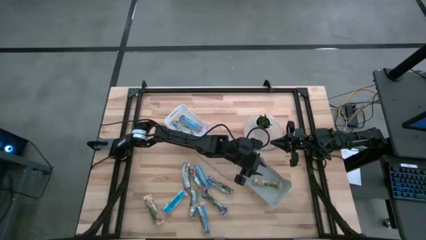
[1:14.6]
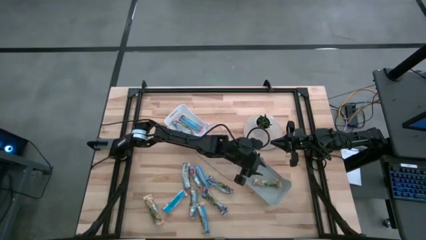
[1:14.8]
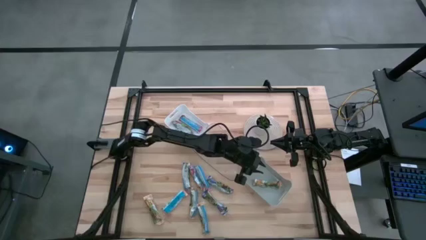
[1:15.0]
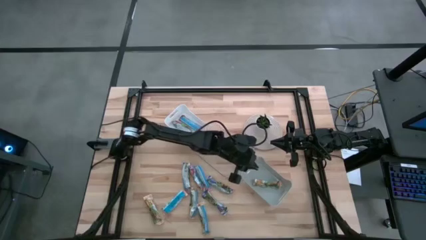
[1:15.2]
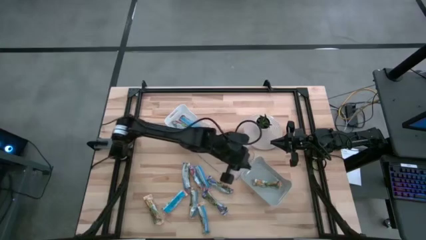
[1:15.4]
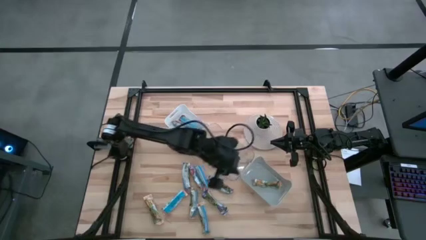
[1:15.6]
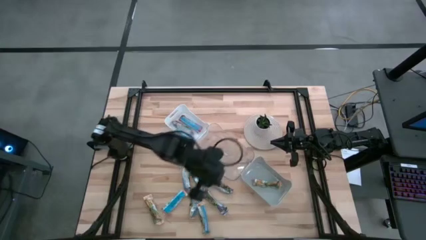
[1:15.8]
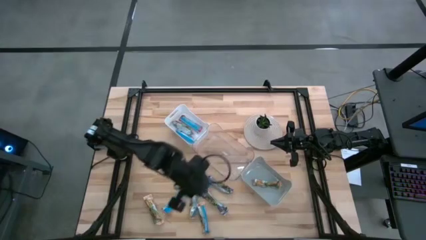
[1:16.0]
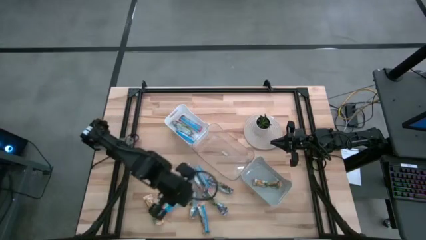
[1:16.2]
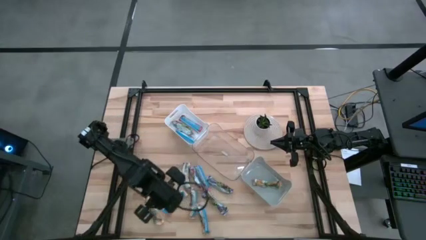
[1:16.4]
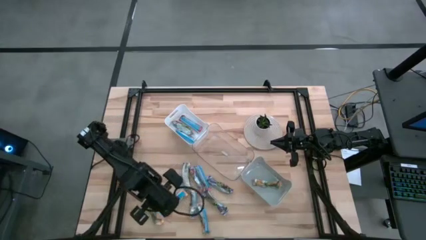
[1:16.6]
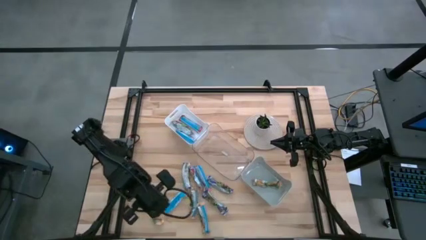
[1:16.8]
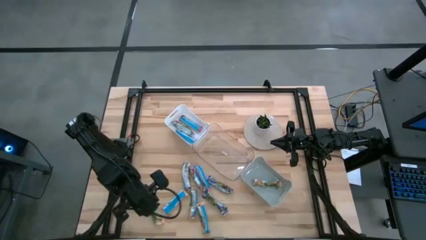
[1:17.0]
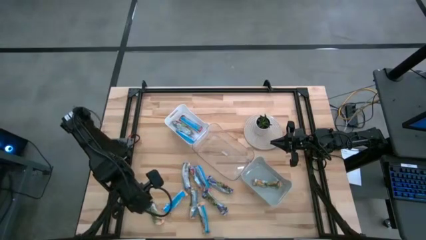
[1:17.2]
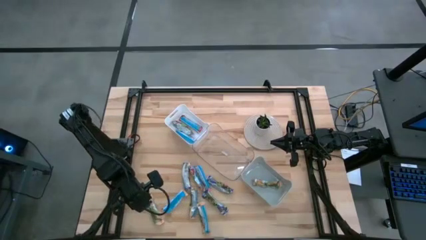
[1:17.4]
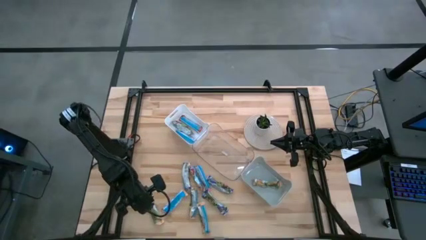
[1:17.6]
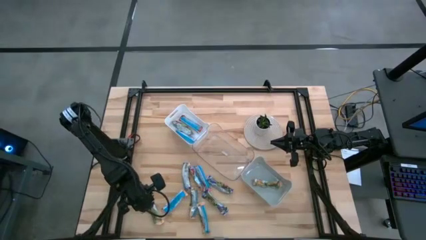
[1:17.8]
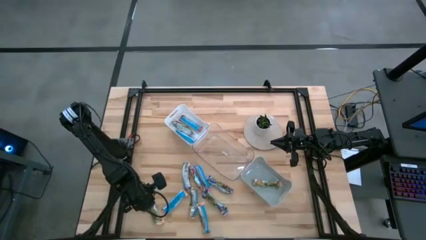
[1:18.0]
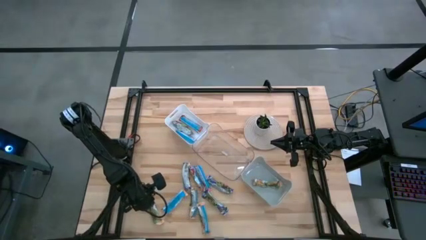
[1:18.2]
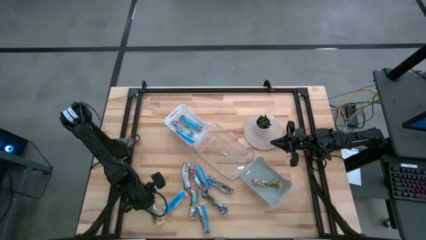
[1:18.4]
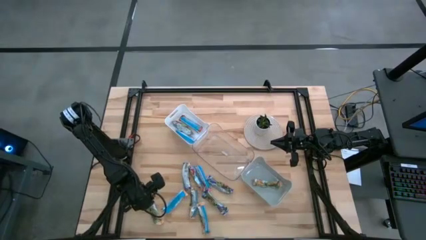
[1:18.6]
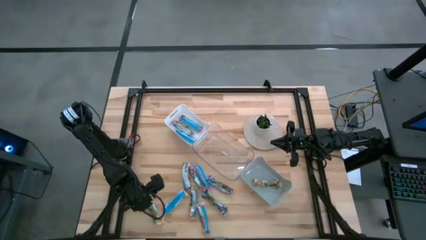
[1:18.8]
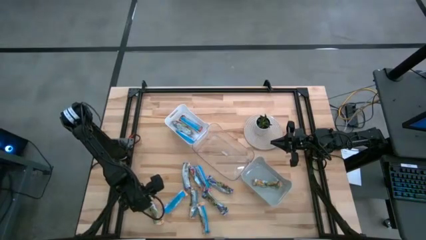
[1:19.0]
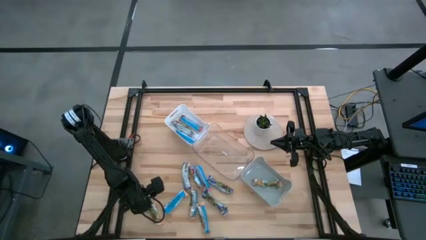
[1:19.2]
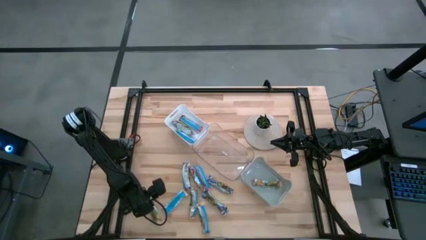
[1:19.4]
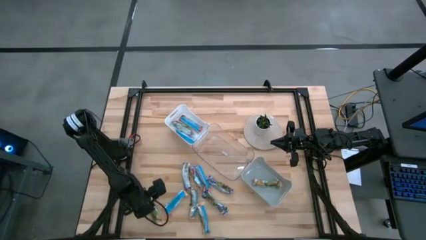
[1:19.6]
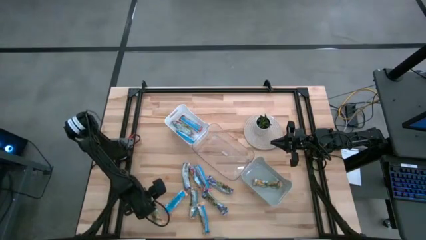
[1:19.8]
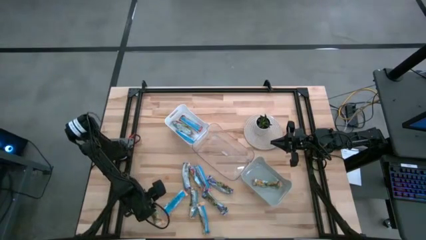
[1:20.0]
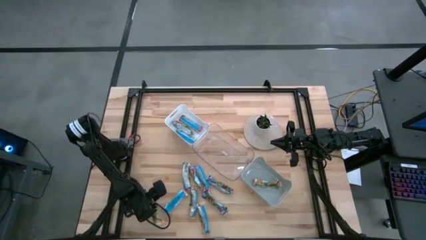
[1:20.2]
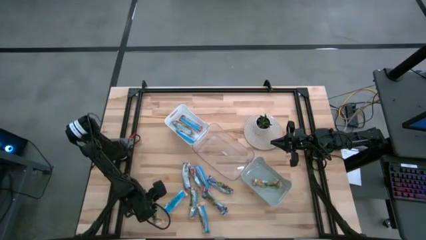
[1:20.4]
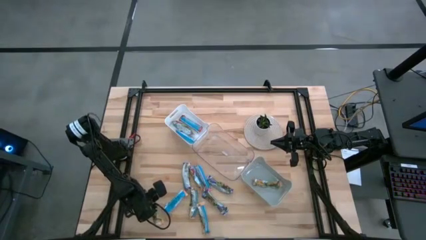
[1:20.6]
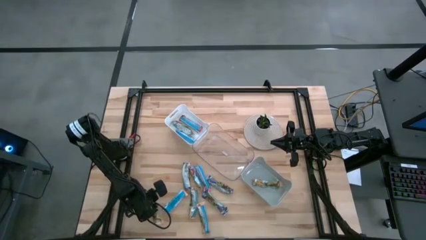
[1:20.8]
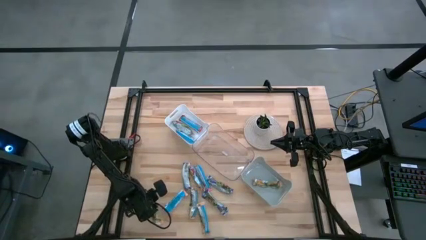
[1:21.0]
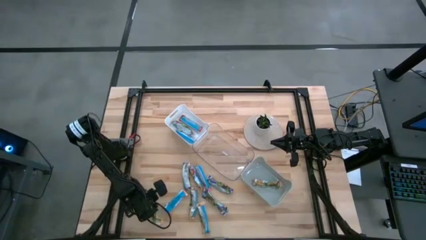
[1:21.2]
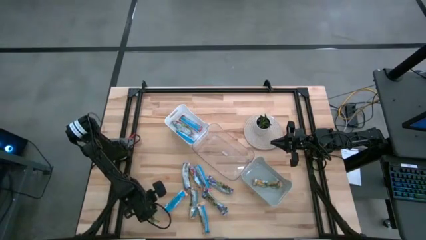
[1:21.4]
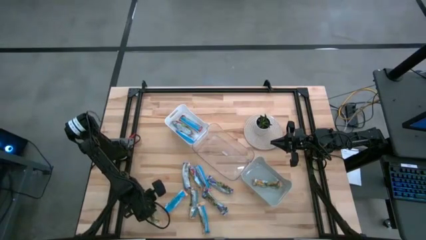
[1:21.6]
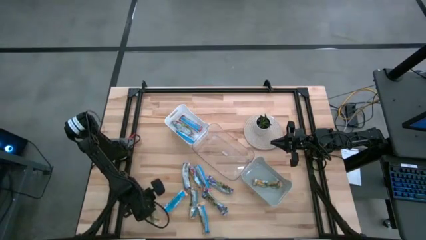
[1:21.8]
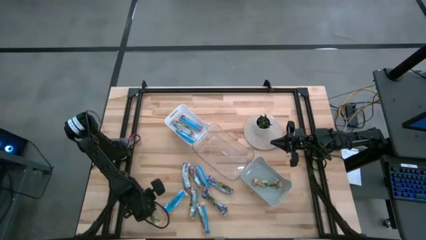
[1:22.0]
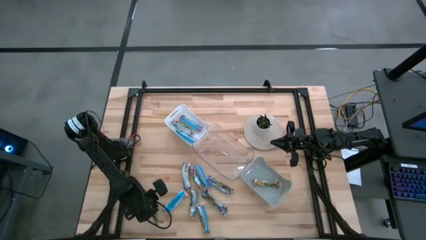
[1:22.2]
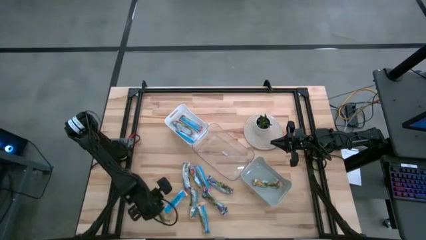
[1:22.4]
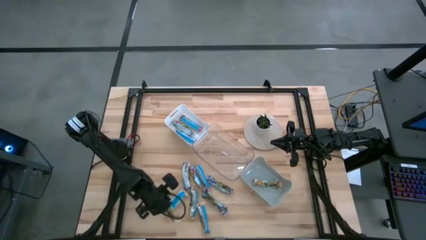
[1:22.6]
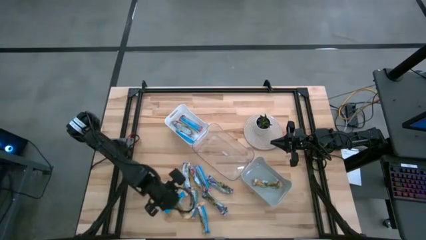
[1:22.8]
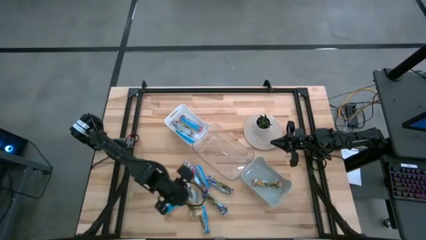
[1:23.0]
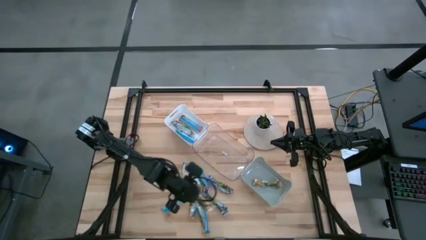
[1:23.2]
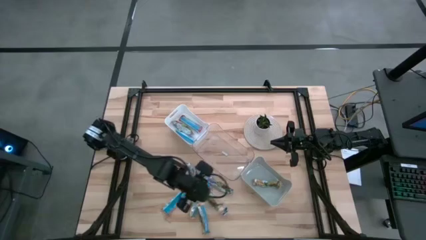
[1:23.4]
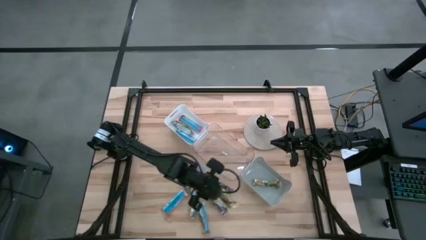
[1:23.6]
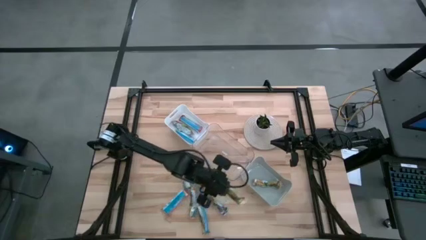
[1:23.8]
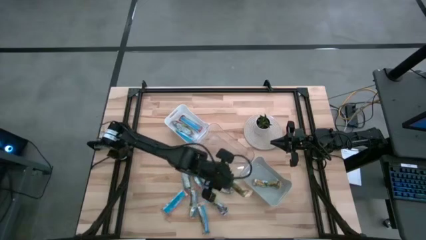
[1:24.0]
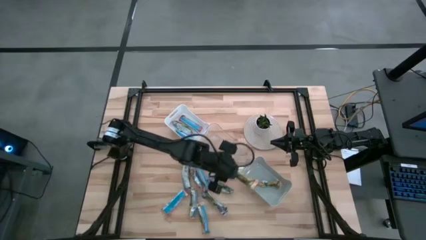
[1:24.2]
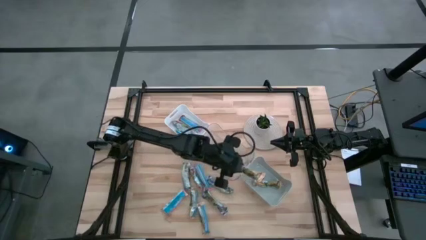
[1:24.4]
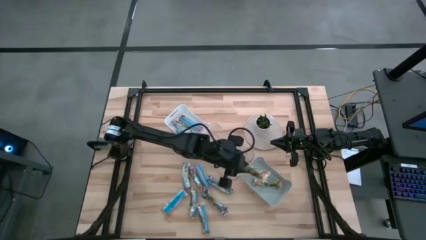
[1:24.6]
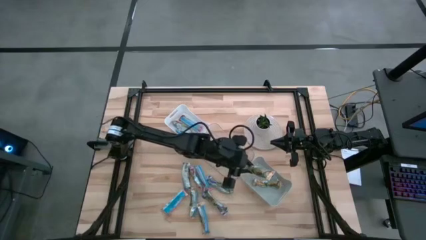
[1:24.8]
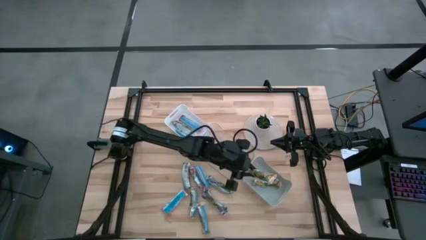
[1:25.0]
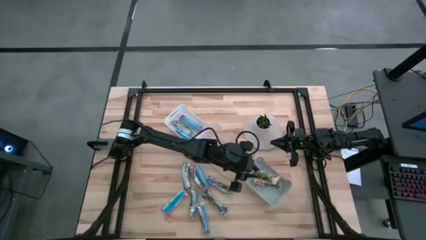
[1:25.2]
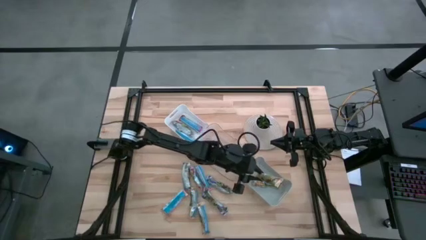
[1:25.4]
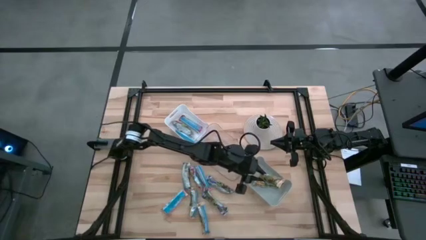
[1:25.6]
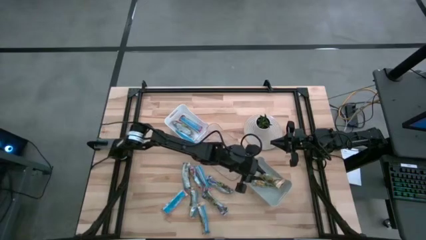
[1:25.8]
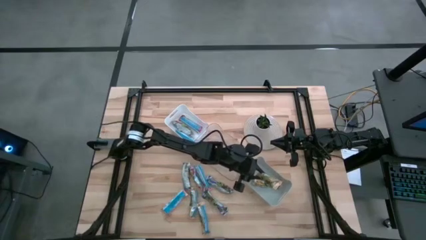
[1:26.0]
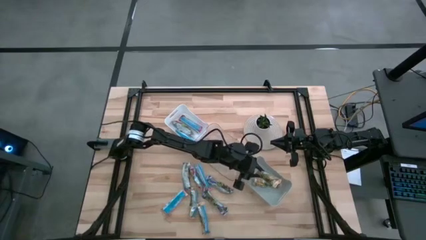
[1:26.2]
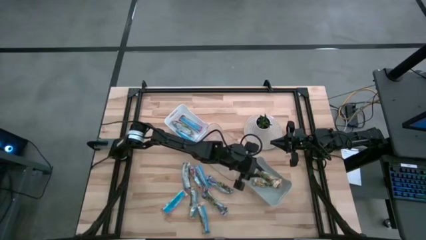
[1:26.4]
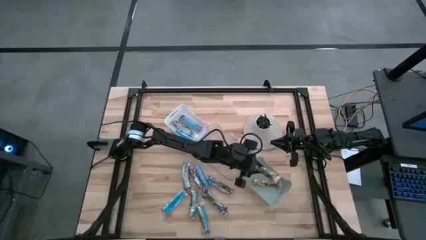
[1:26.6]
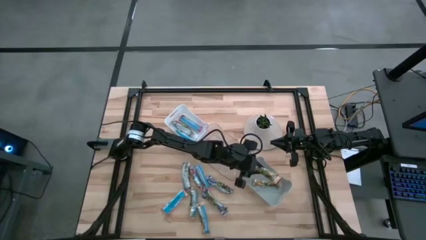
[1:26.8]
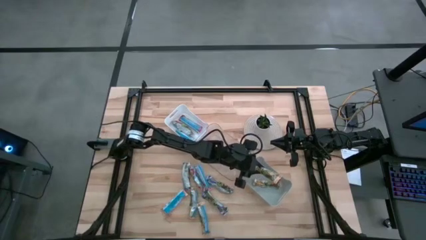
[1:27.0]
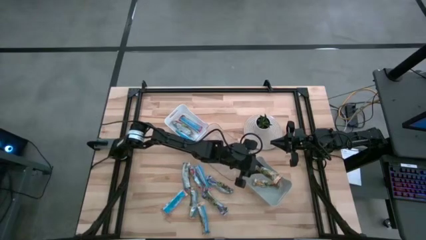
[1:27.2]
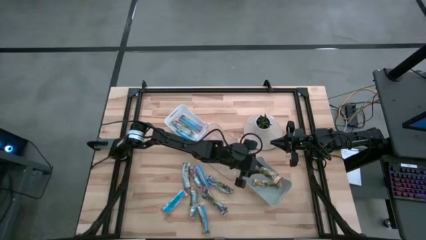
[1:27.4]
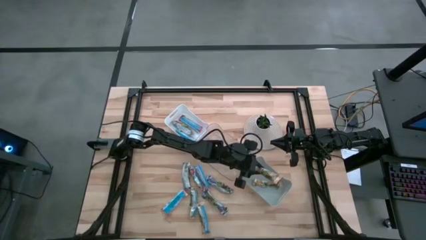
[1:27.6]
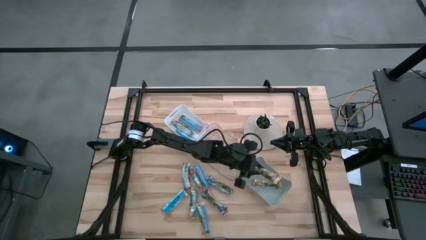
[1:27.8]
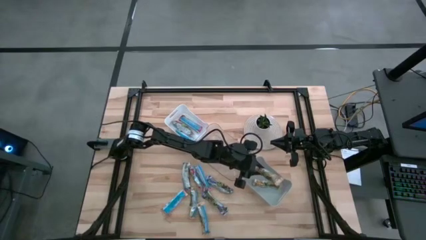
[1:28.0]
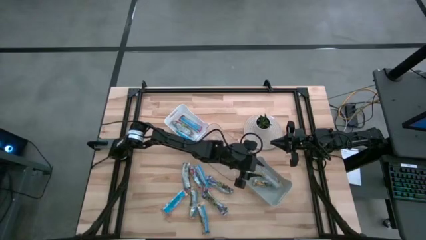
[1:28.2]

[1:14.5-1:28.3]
Task: Pick and place Granola Bars by type
Put the orange granola bar into the gray bin

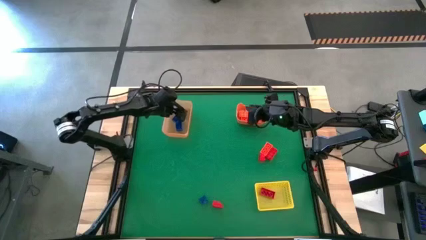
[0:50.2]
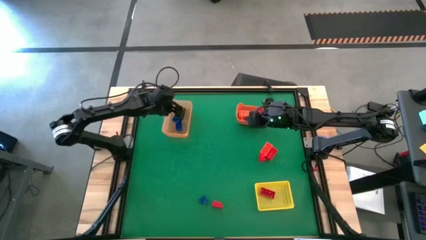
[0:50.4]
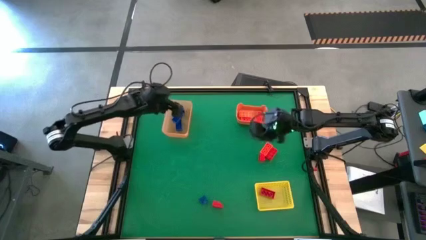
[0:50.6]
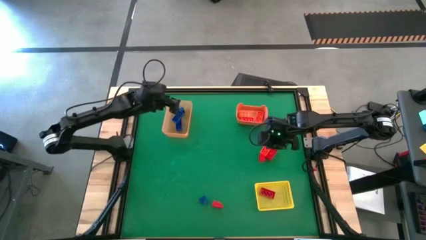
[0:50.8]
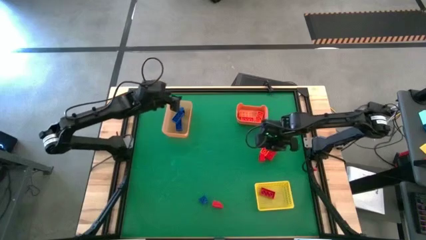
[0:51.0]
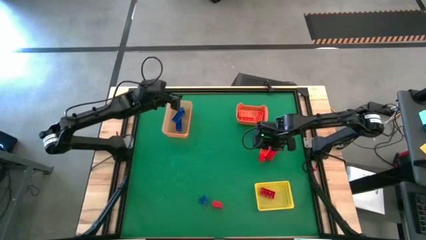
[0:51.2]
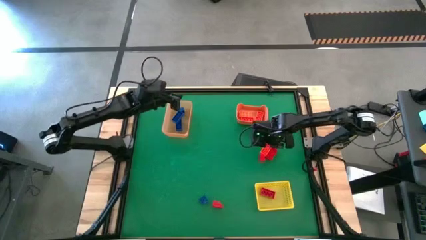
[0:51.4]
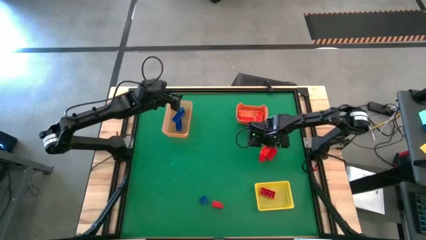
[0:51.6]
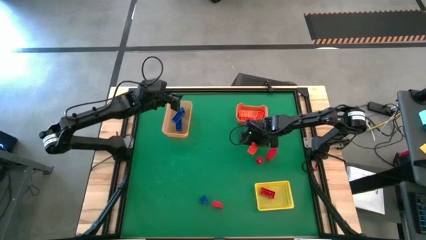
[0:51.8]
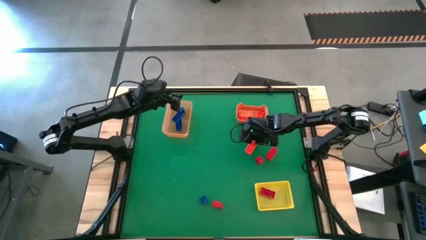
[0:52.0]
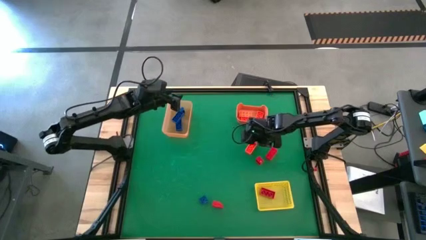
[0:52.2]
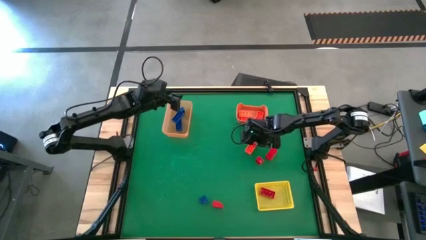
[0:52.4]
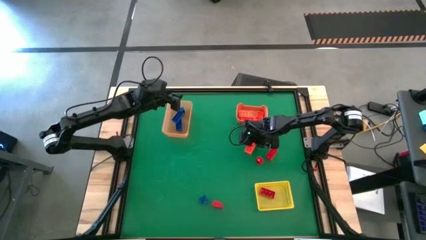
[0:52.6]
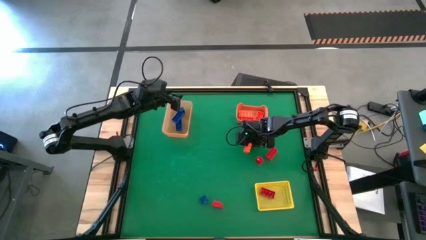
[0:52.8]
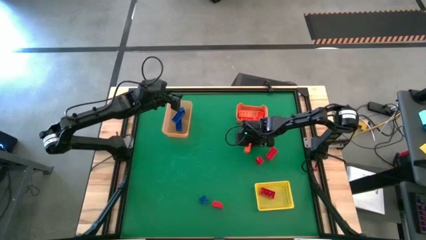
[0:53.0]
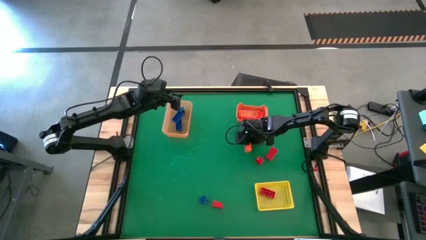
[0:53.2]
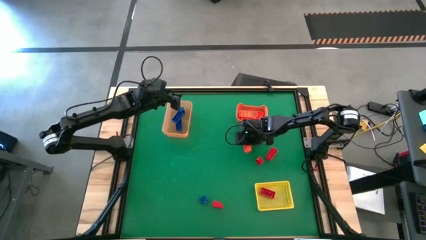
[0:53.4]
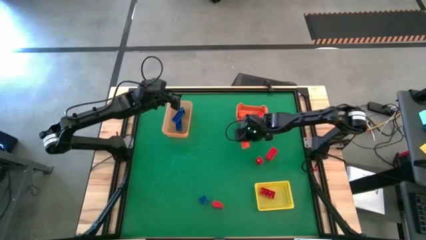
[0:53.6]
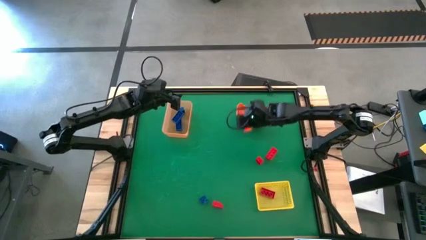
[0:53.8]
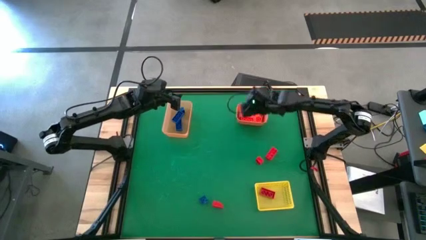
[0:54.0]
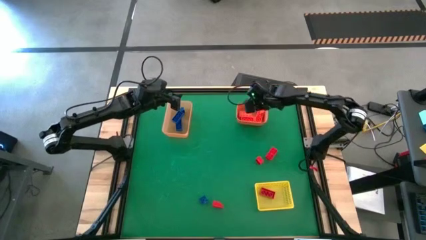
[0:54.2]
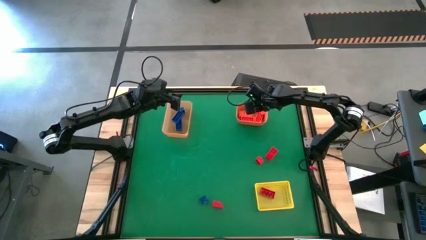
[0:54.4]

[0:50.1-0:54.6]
Task: Sort & place blocks by color
Put the orange game piece into the right orange bin
